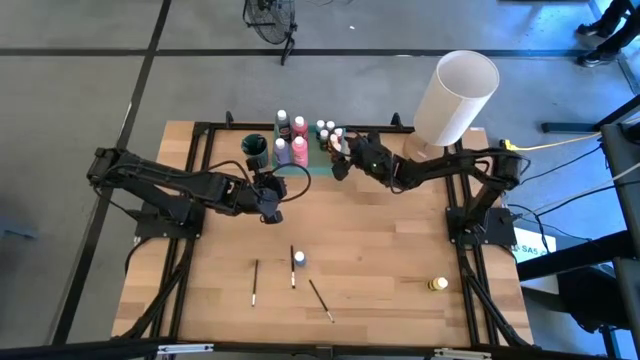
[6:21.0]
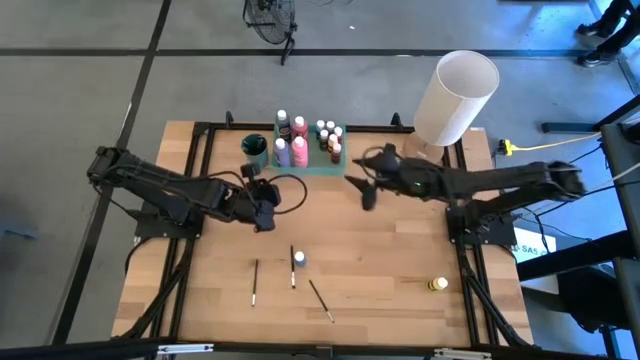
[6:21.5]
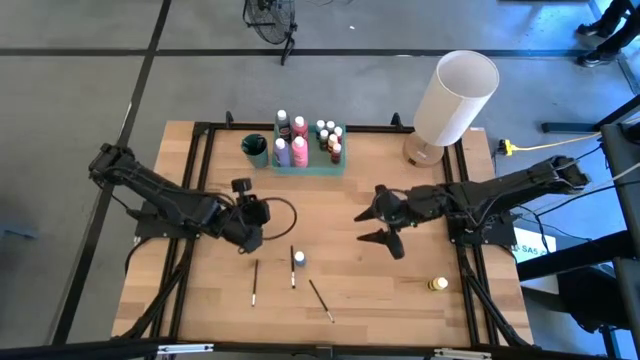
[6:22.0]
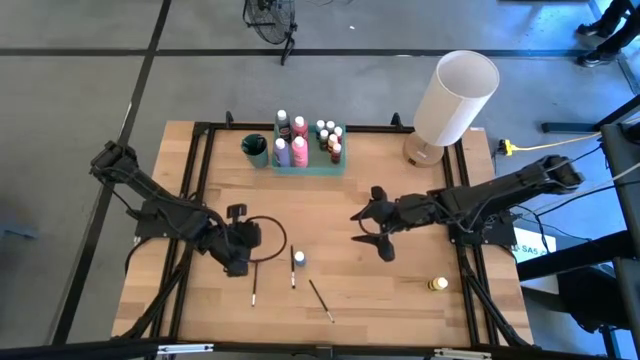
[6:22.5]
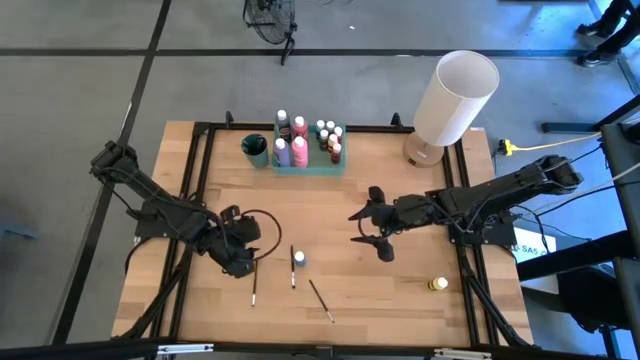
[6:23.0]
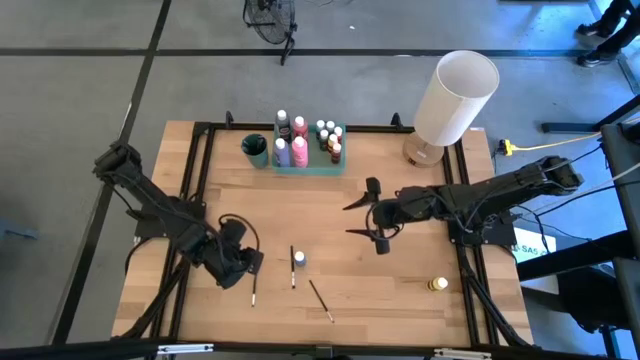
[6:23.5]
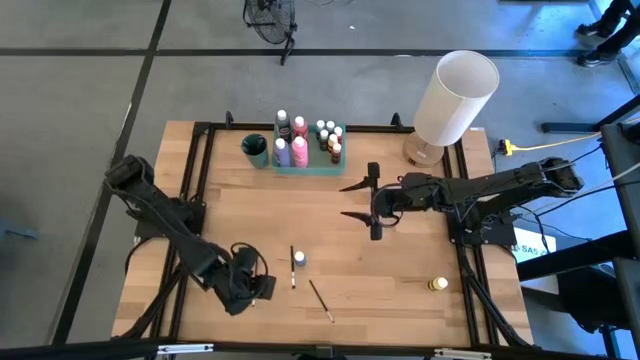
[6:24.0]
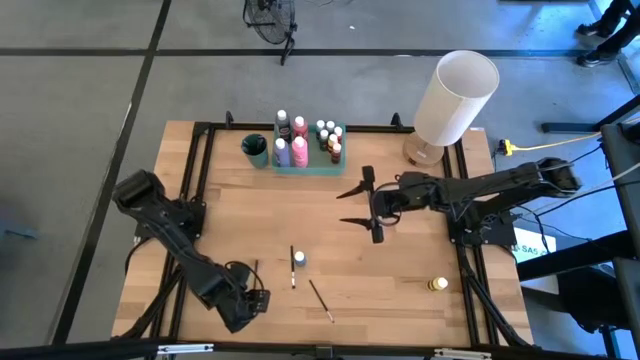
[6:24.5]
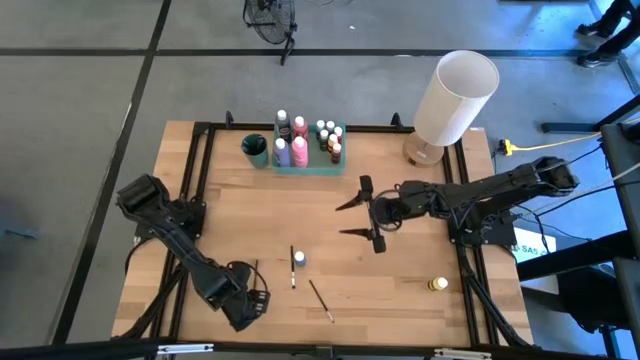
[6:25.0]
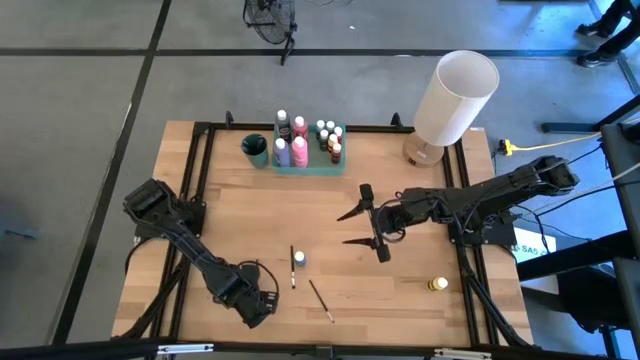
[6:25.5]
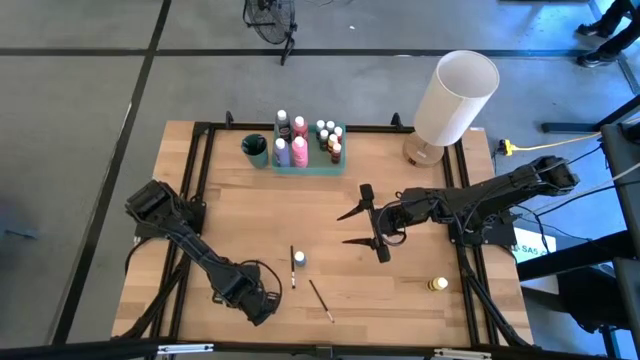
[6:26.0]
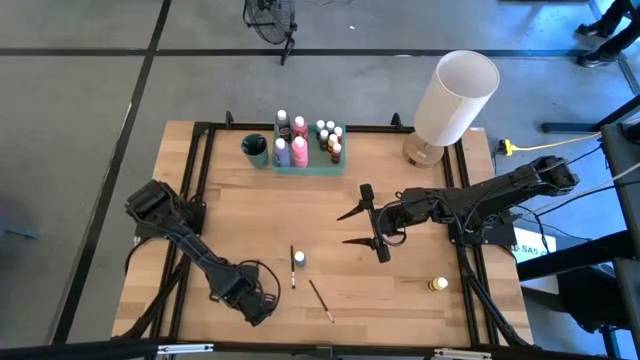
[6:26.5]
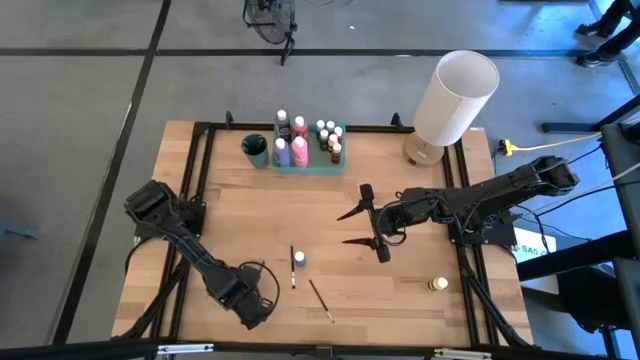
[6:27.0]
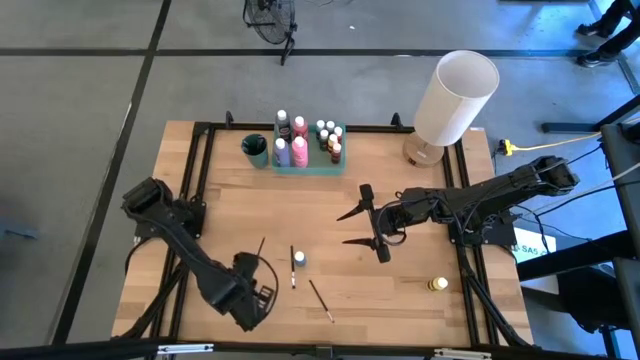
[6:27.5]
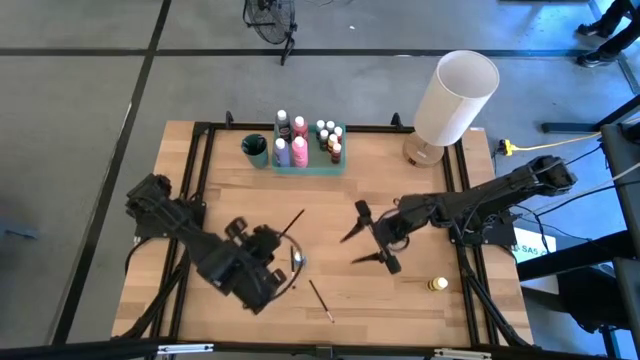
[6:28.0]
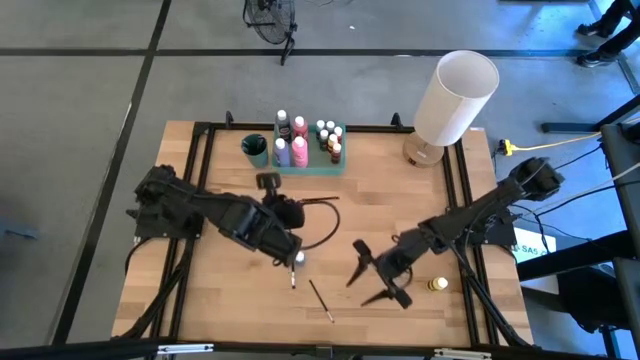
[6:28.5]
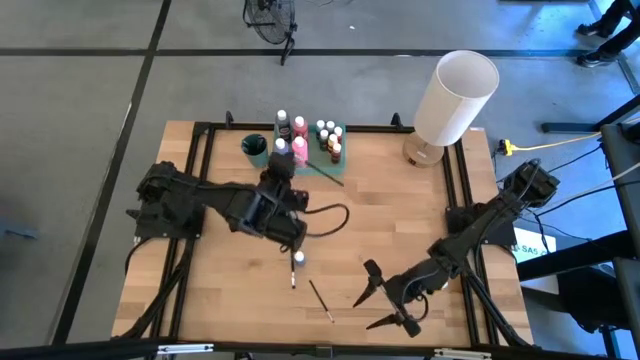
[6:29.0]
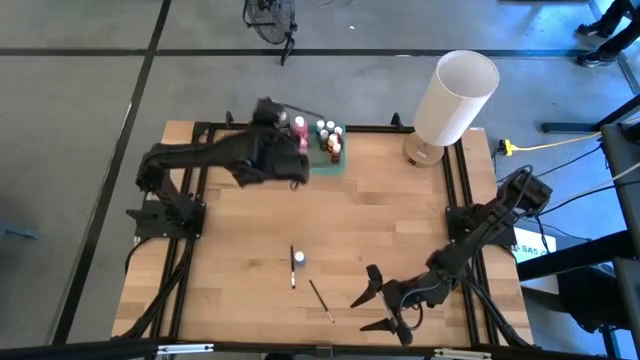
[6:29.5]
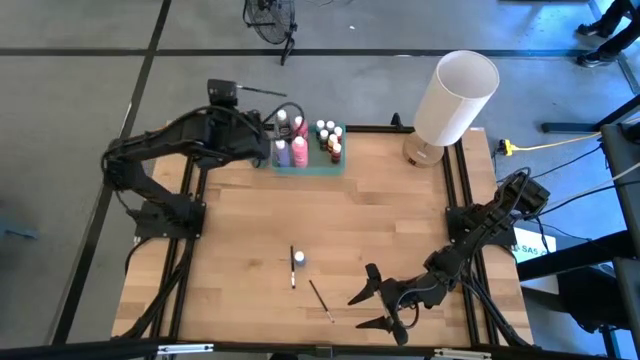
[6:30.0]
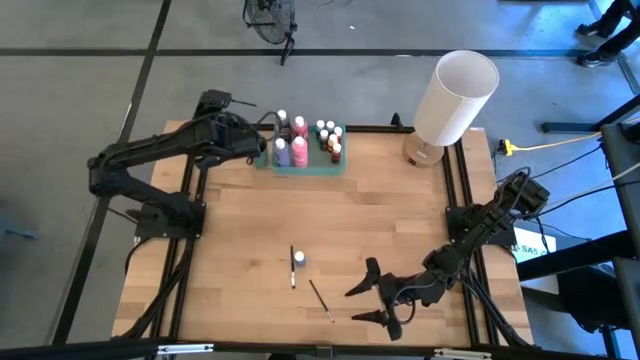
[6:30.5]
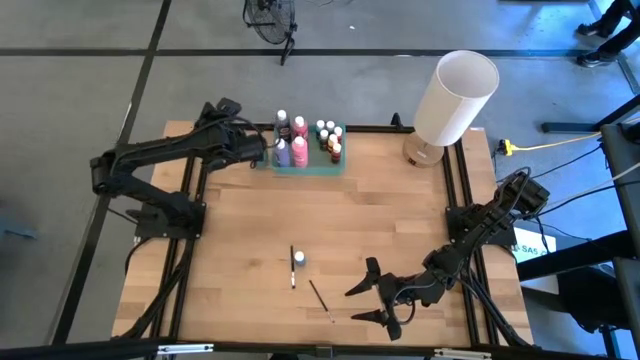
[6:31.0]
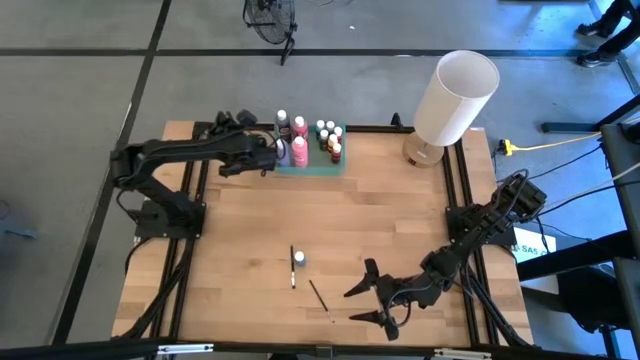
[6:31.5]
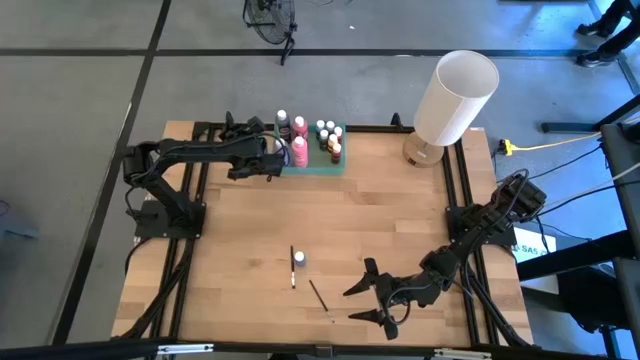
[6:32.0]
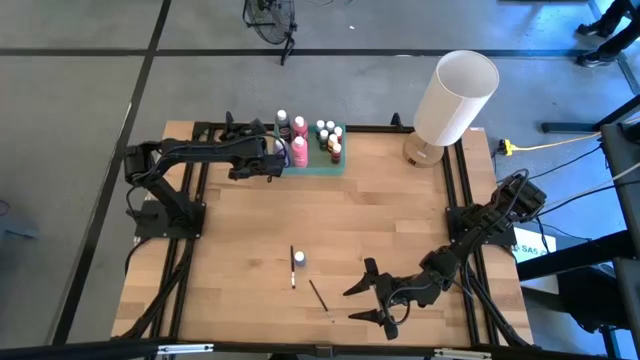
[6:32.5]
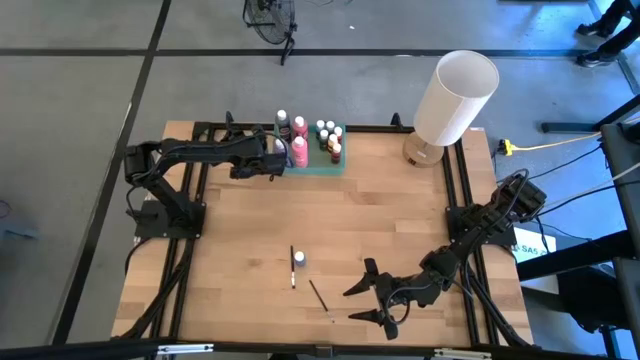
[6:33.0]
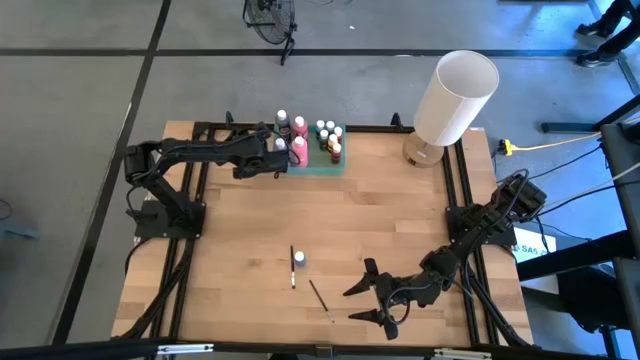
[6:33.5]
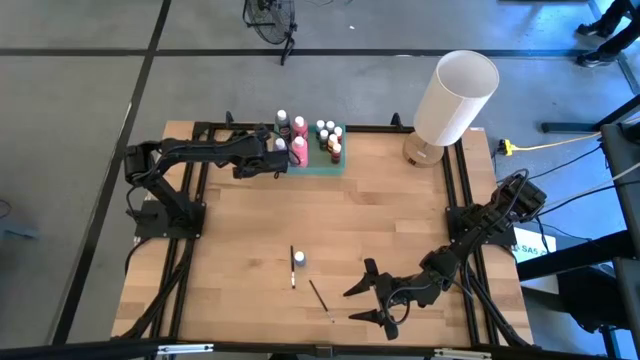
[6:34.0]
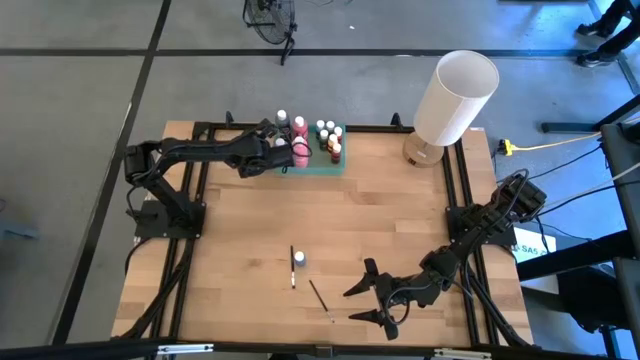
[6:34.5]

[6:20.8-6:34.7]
Task: Pick & Place Paint Supplies
Put the silver paintbrush into the green cup

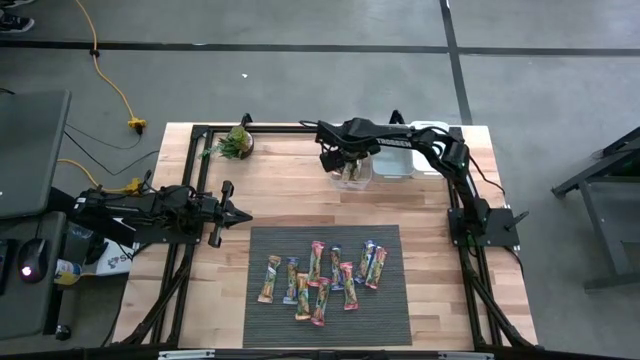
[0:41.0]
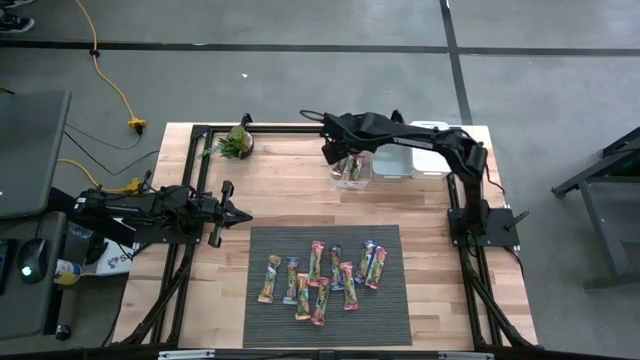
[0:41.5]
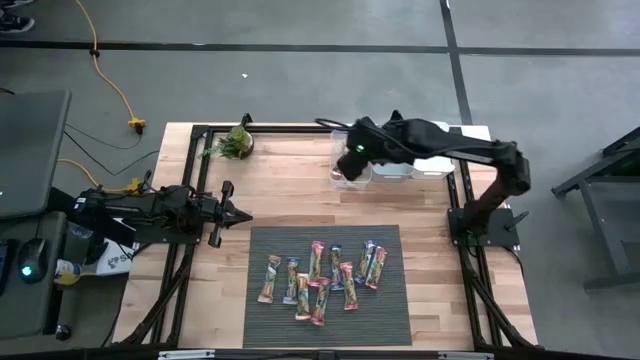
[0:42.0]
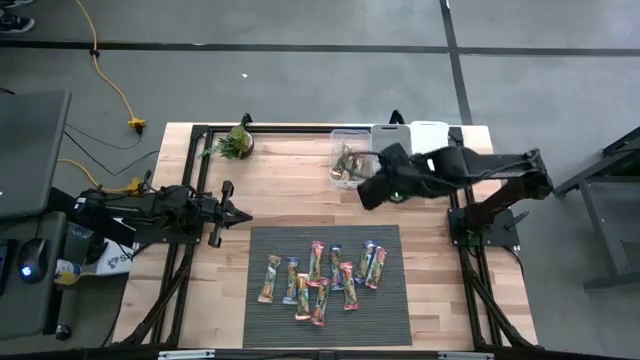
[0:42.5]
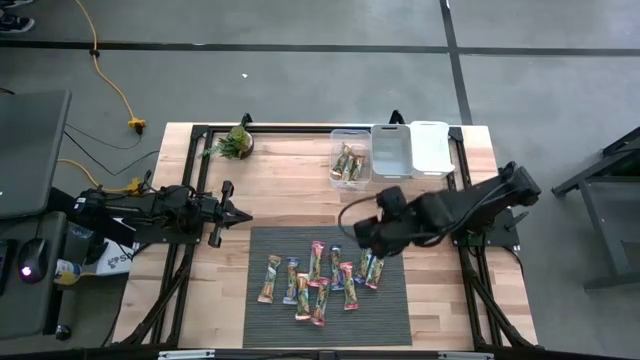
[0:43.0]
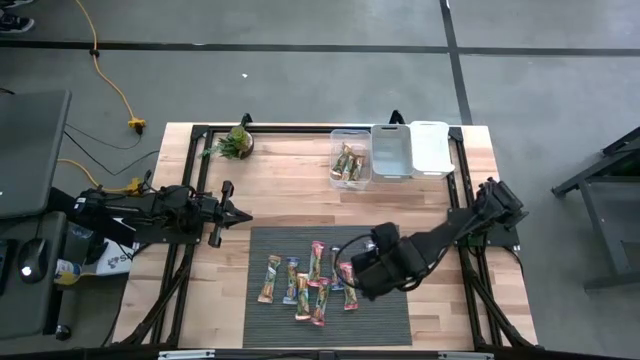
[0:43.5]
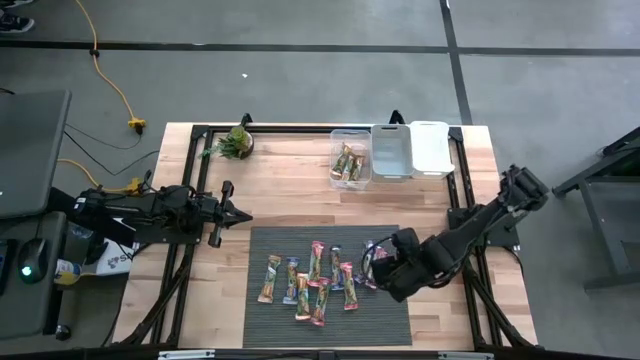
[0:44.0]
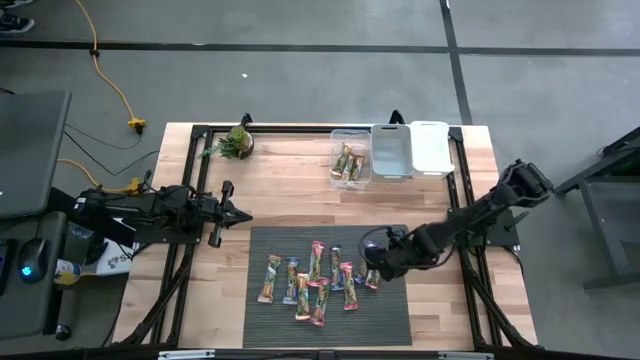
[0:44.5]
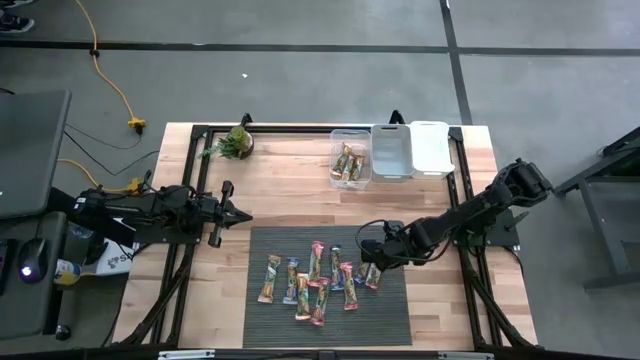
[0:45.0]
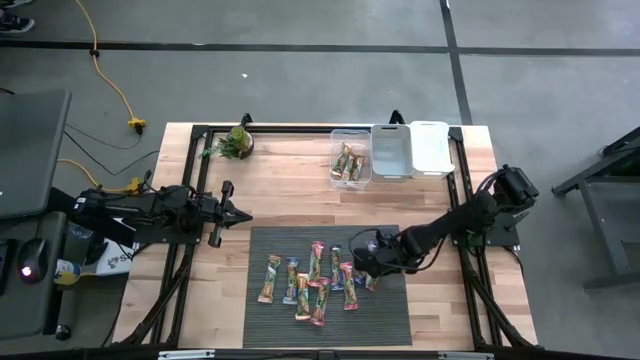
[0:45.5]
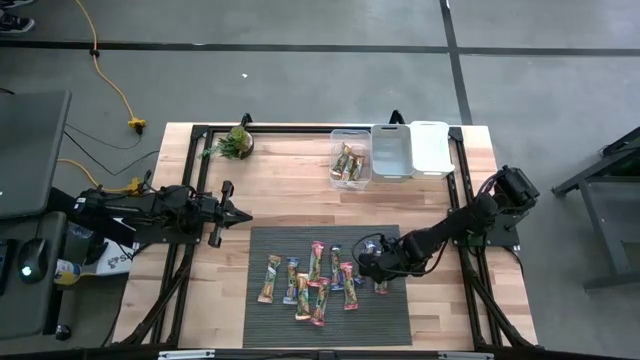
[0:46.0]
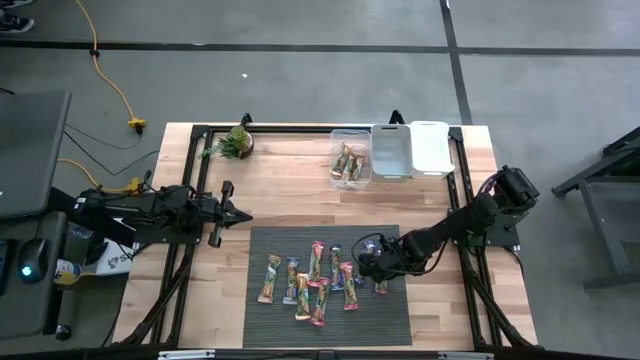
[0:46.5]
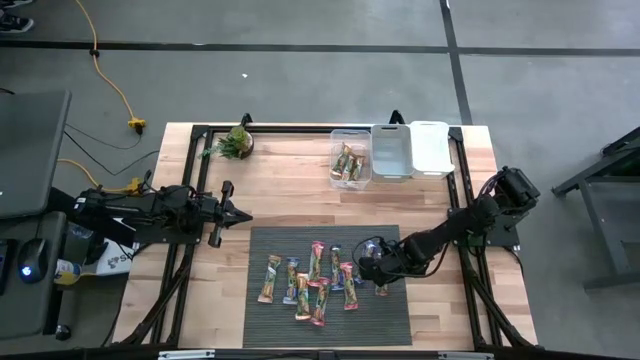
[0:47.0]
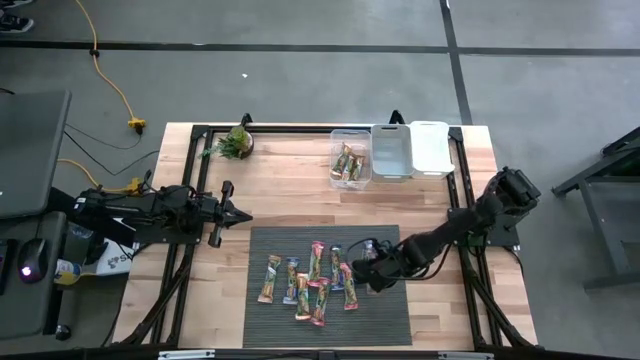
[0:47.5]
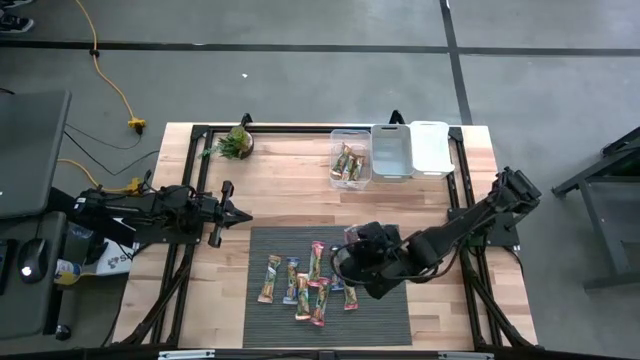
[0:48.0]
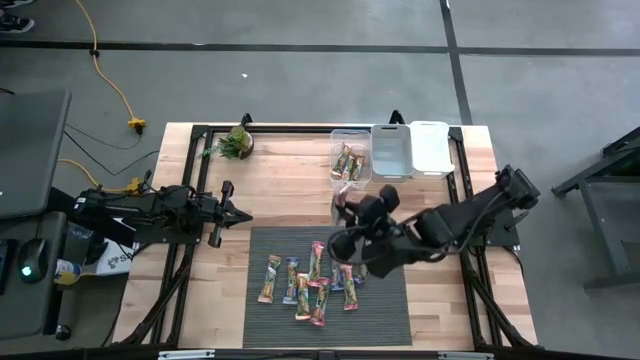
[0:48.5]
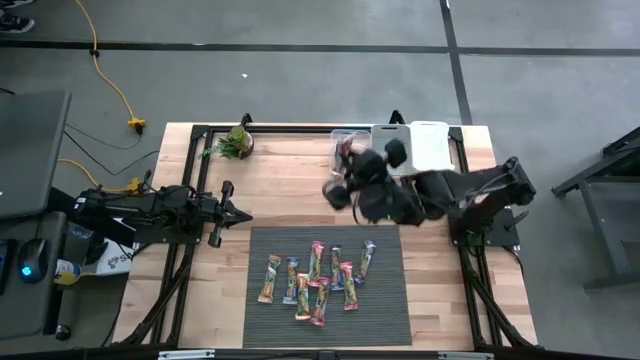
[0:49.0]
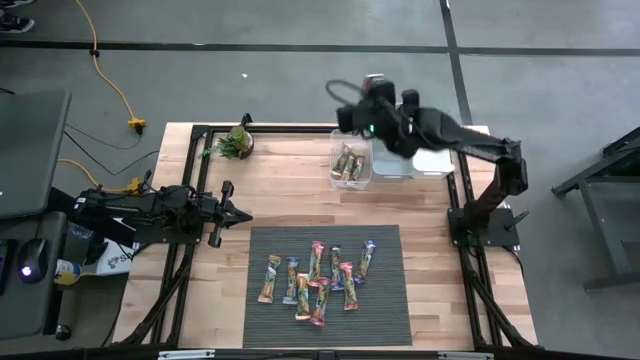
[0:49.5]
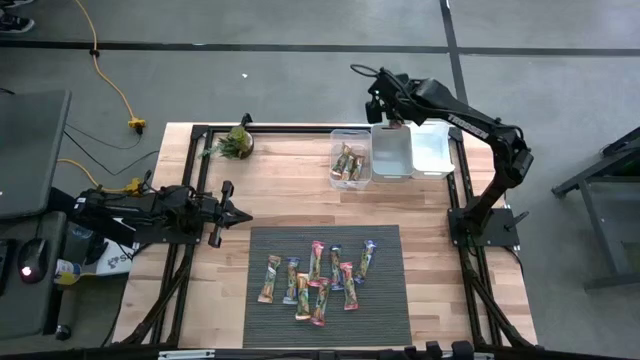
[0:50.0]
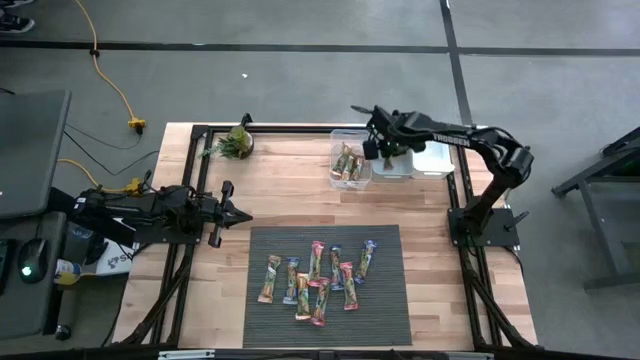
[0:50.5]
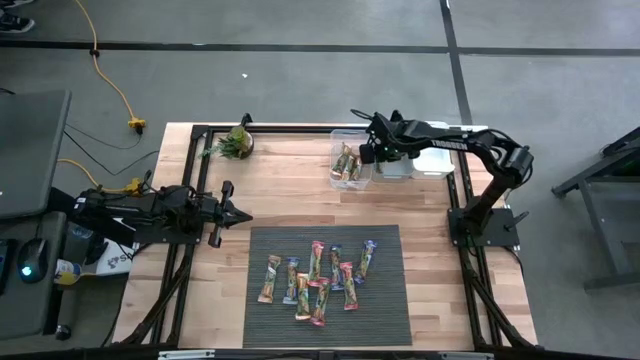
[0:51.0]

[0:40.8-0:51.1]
Task: Pick and place Granola Bars by type
Put the red granola bar into the gray bin
